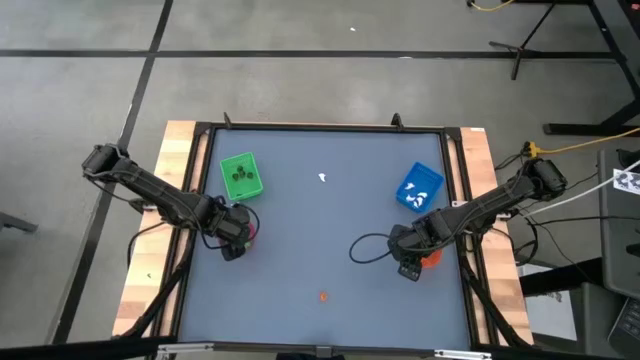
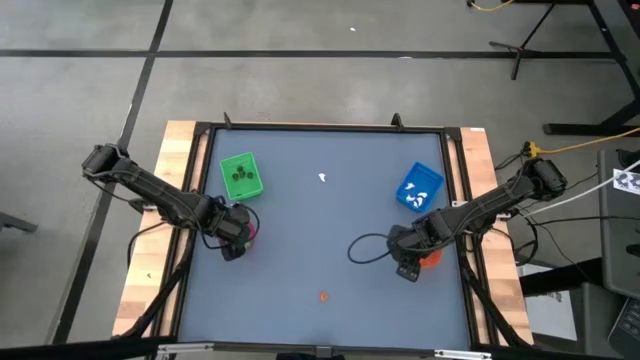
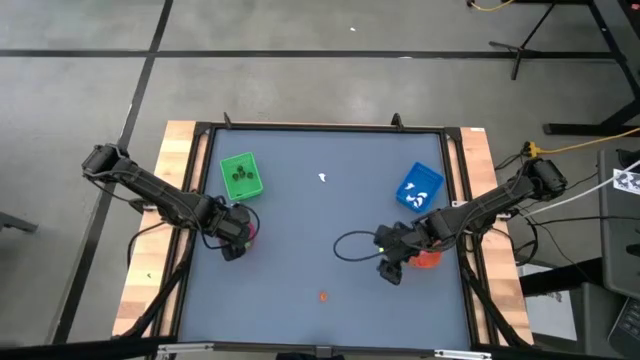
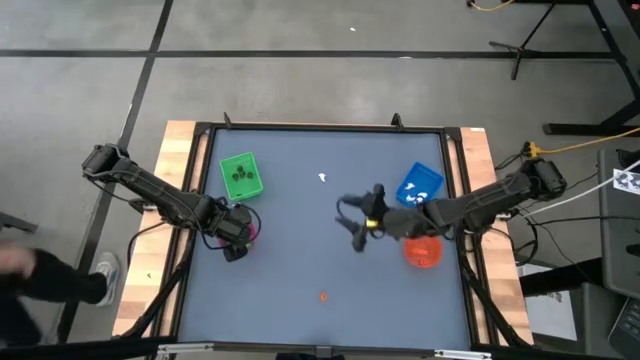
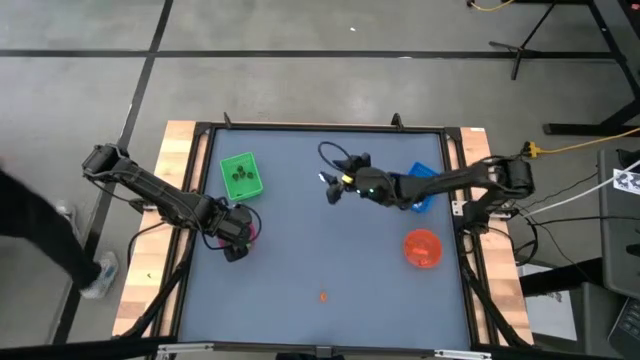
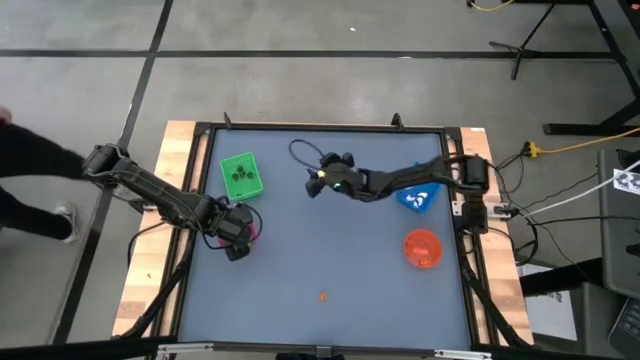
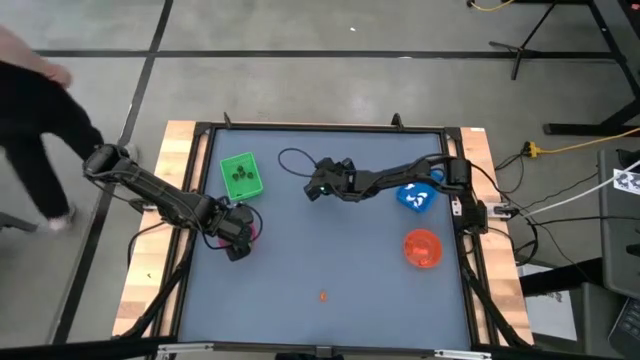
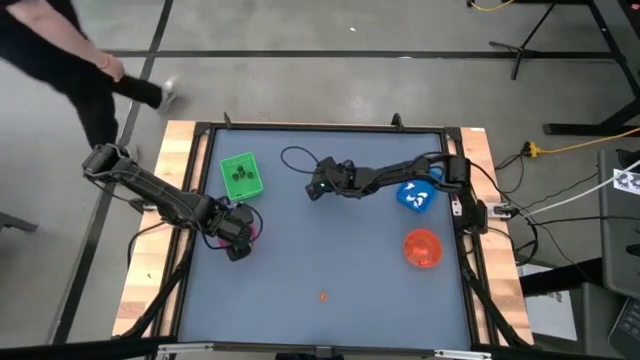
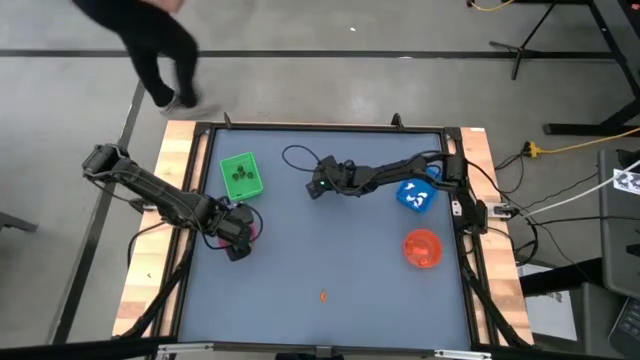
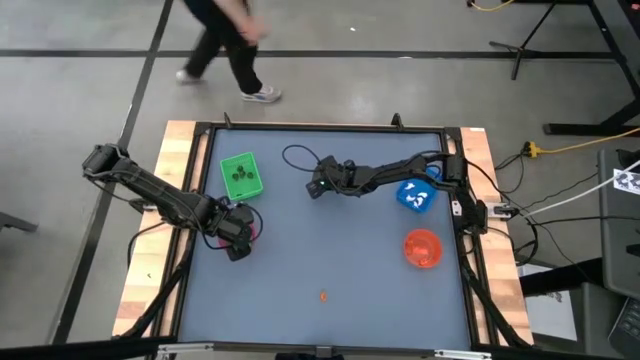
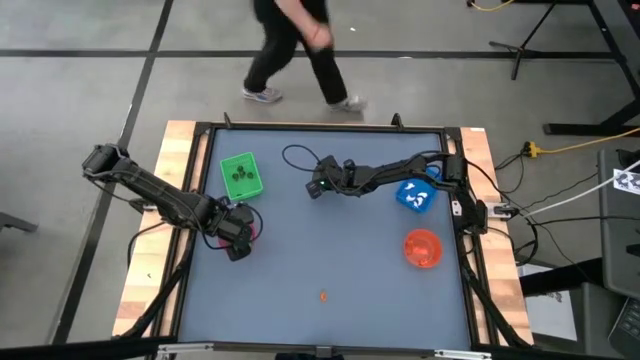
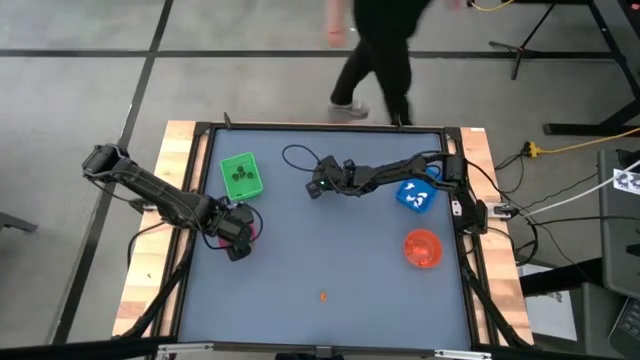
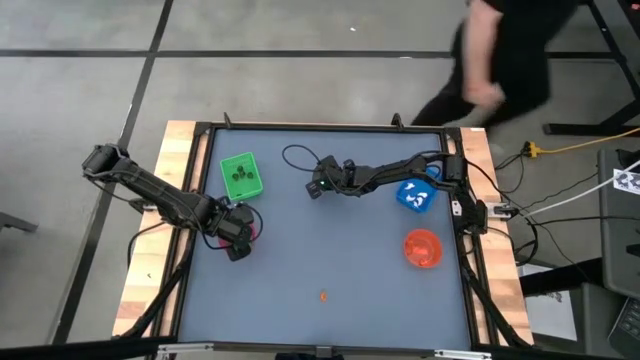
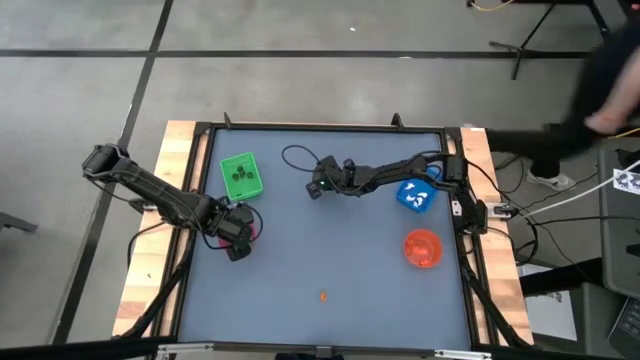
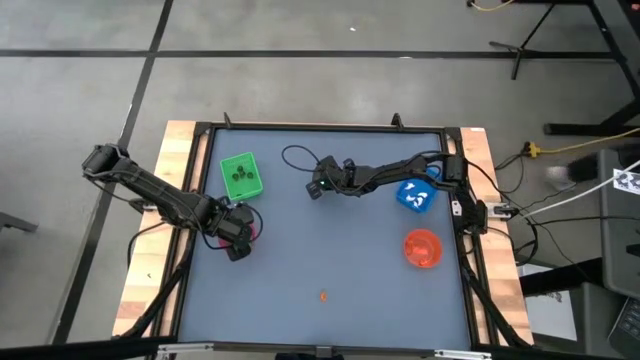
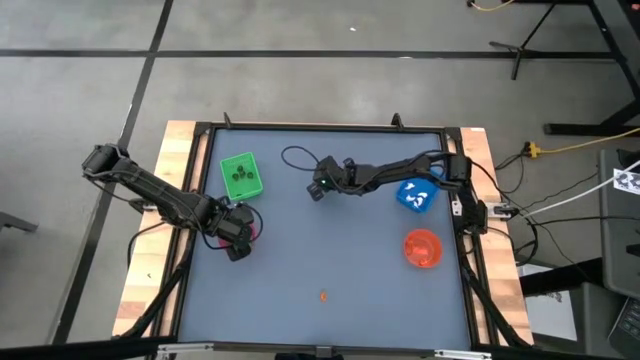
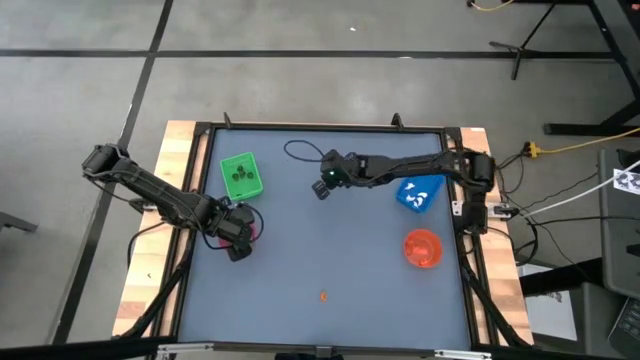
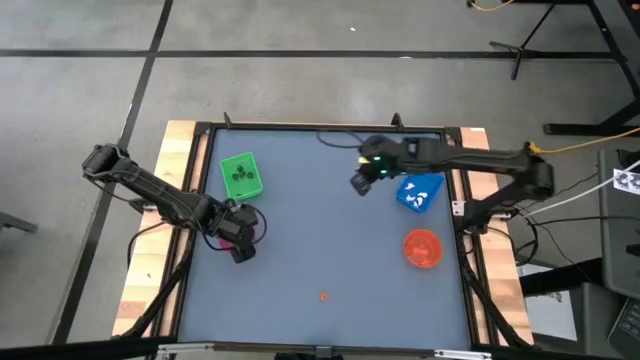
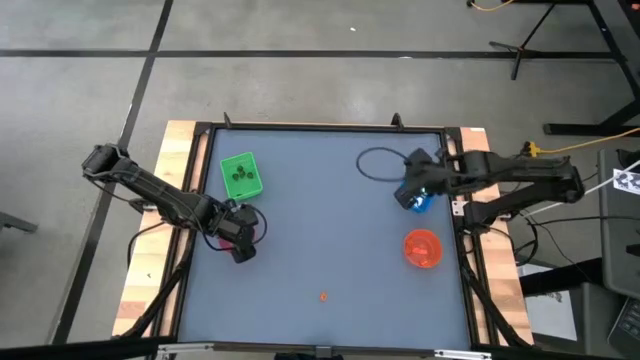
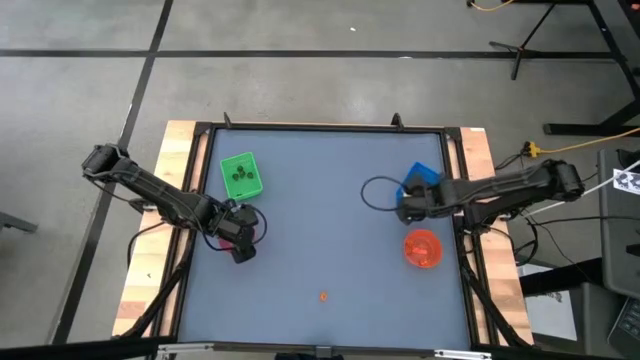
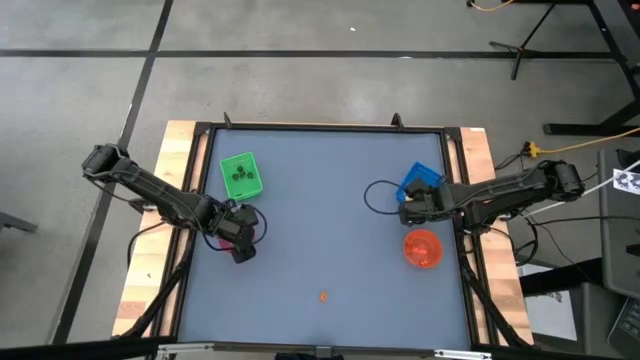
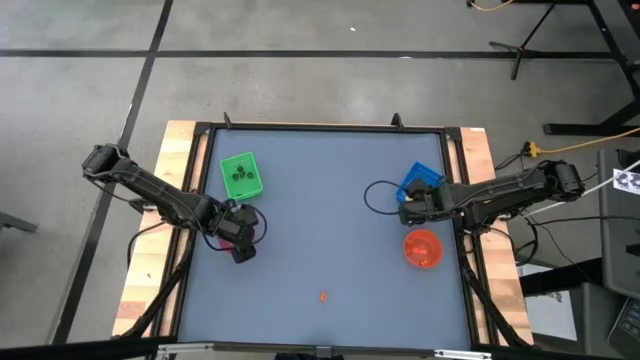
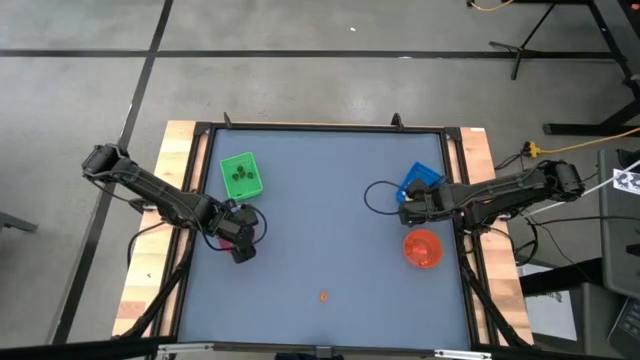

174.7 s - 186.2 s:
Task: Sort Halloween decoration
Put the small white ghost toy into the blue basket

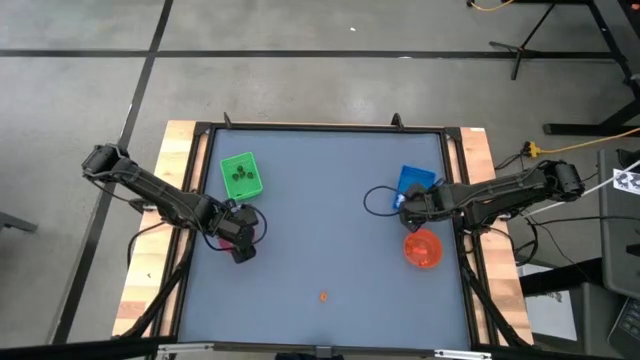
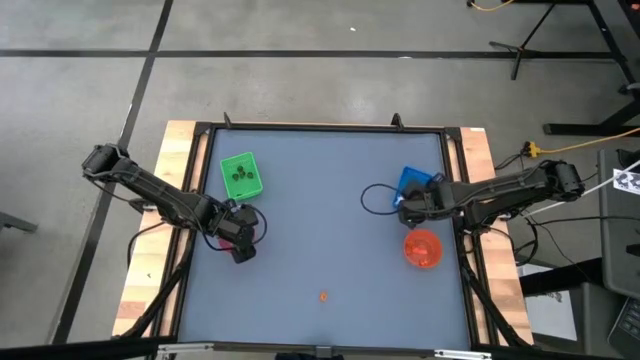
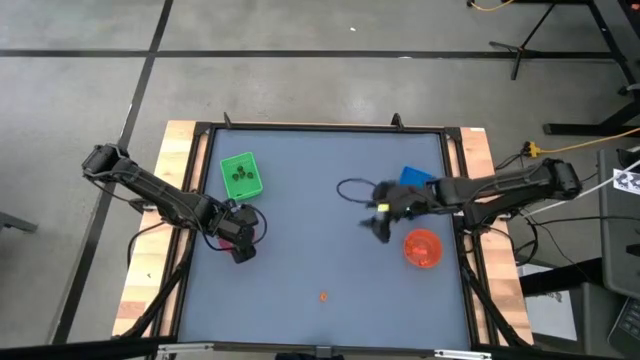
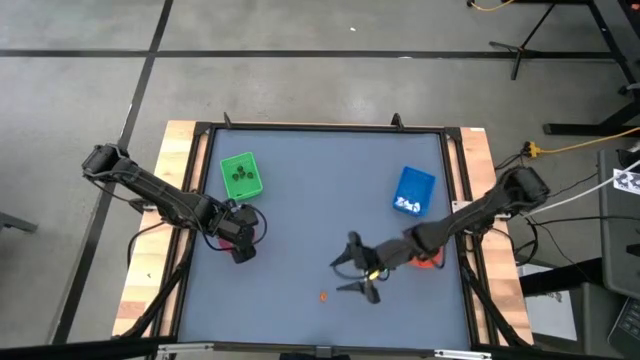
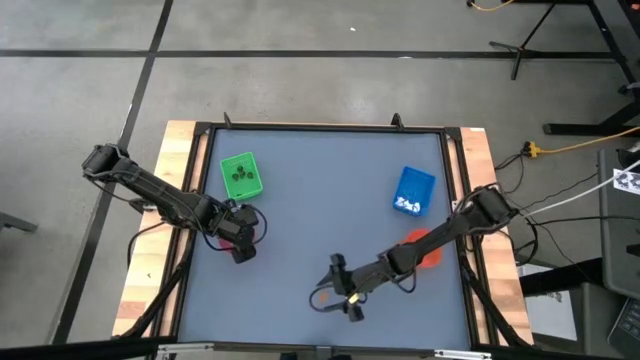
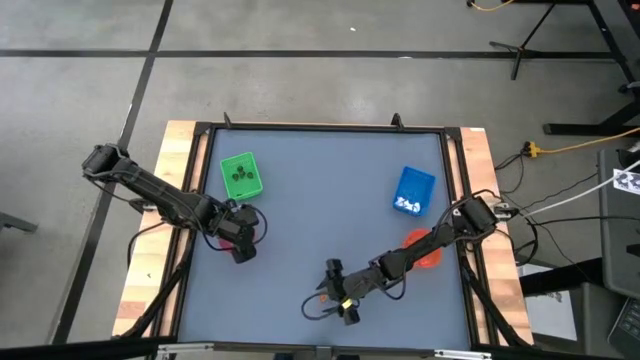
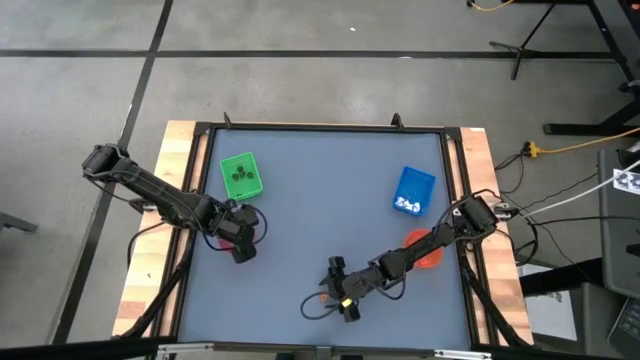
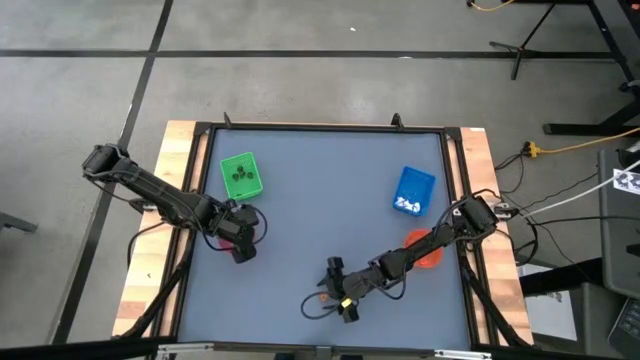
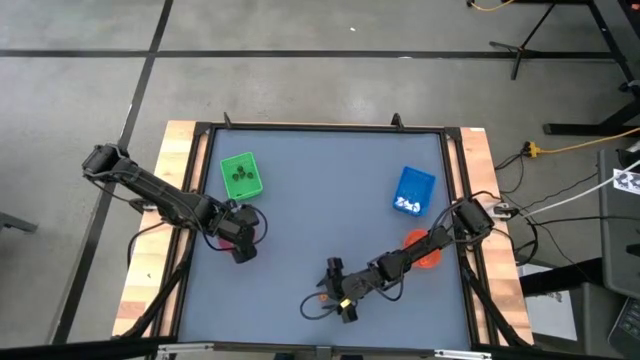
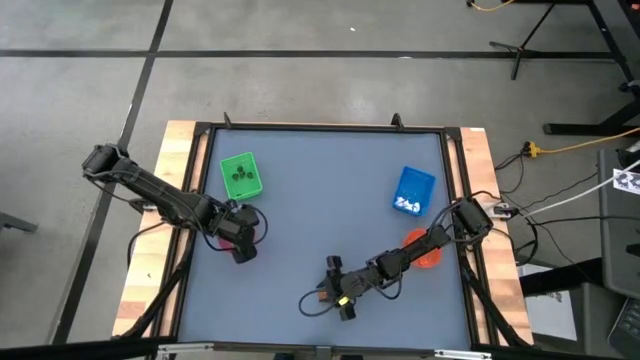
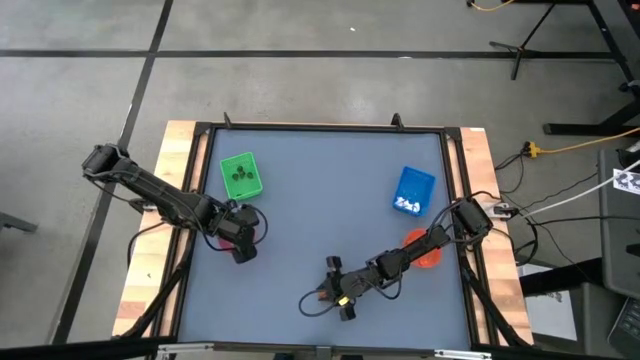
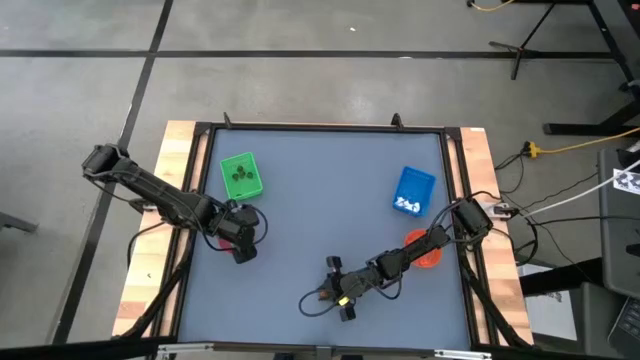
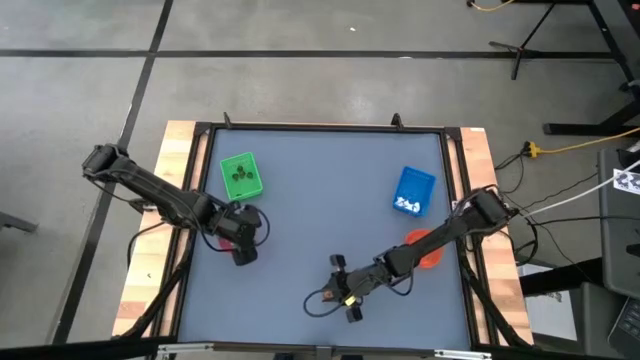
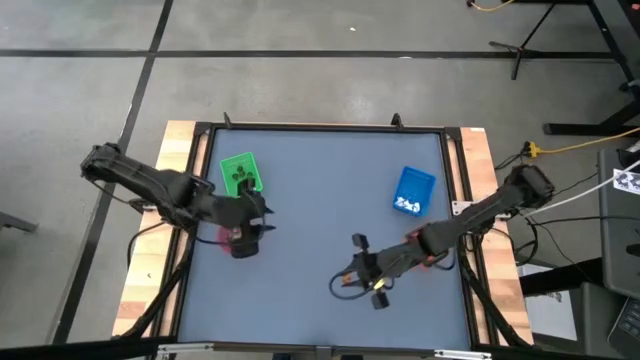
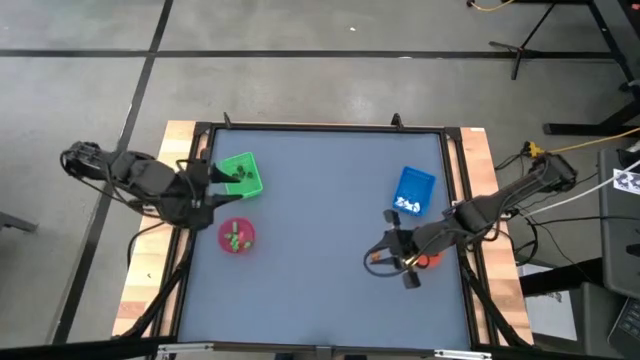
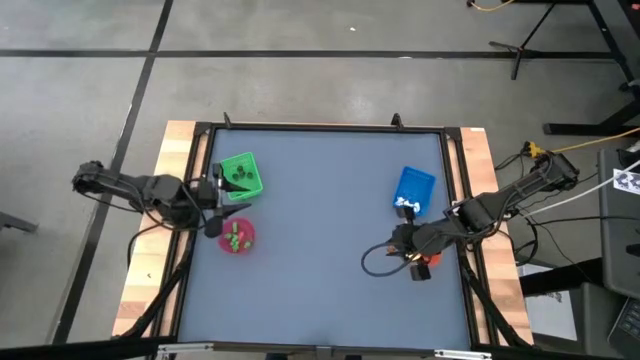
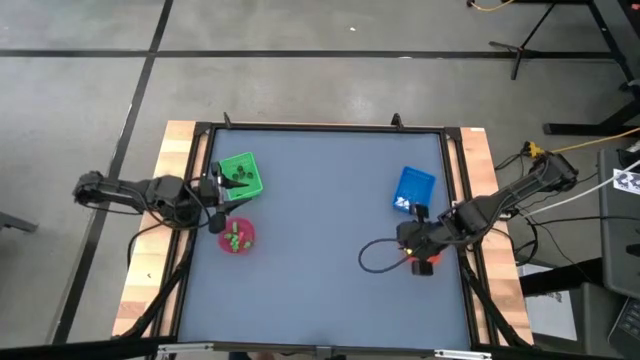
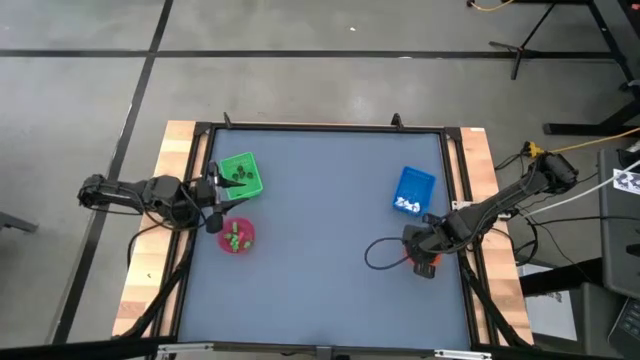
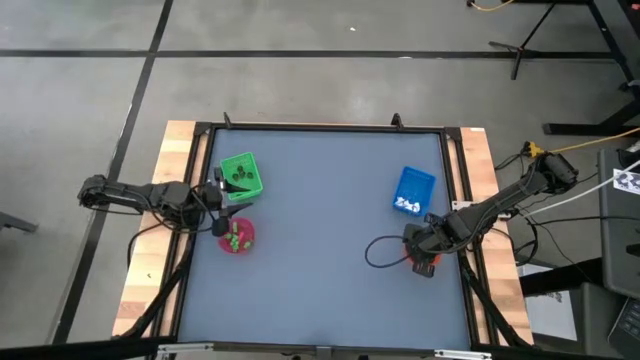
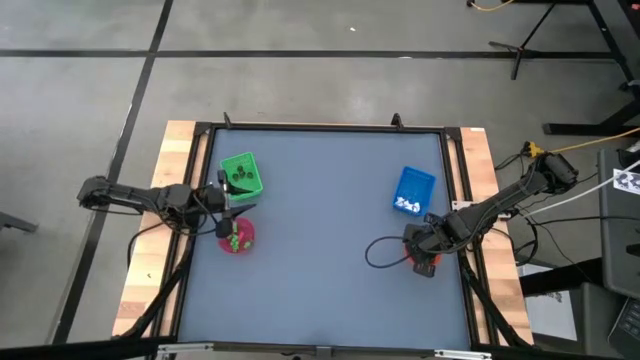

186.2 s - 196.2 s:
Put the small orange pumpkin toy into the transparent orange bowl
